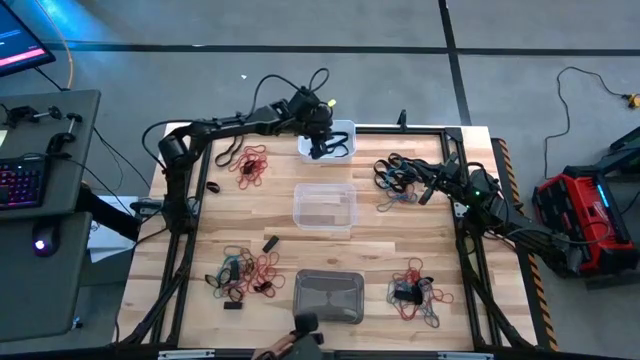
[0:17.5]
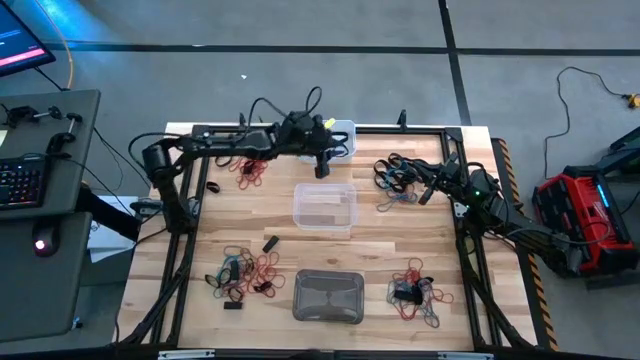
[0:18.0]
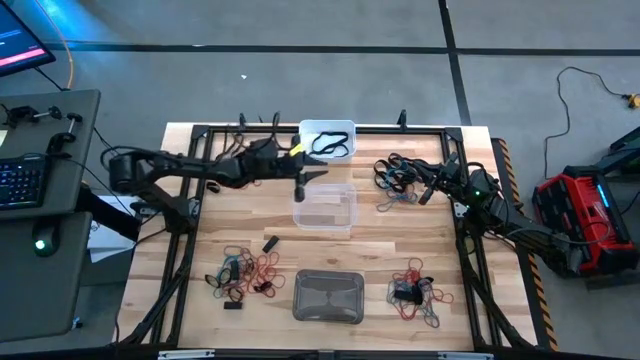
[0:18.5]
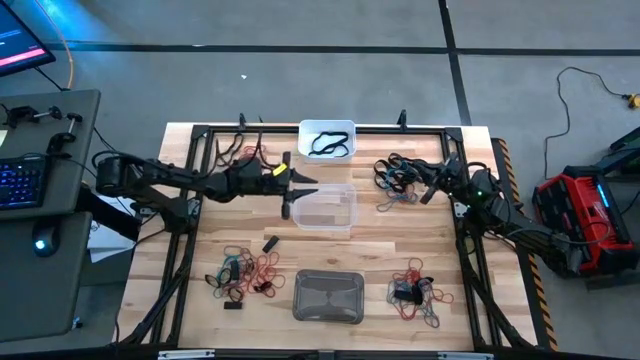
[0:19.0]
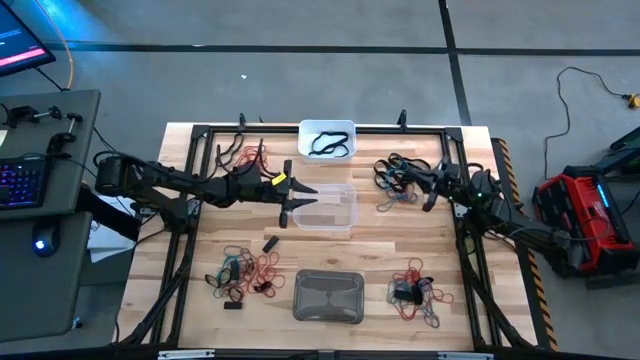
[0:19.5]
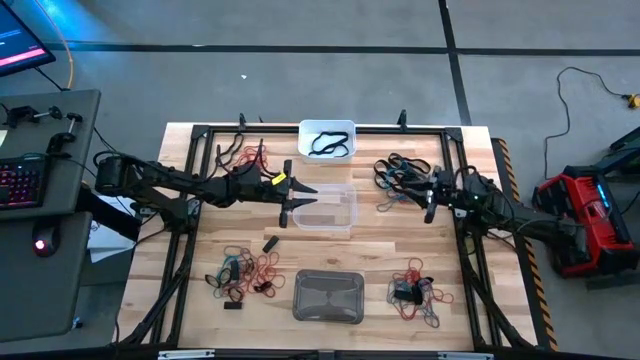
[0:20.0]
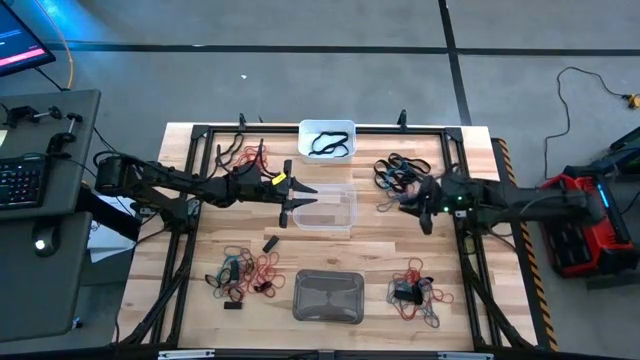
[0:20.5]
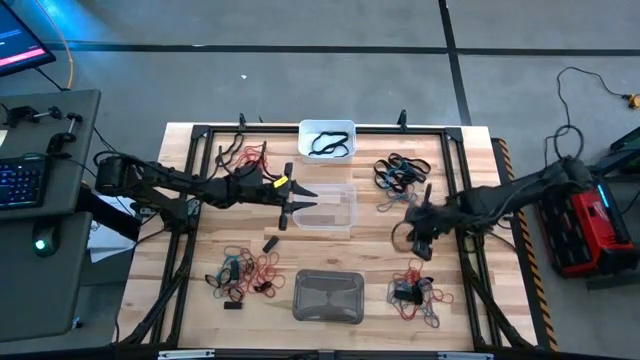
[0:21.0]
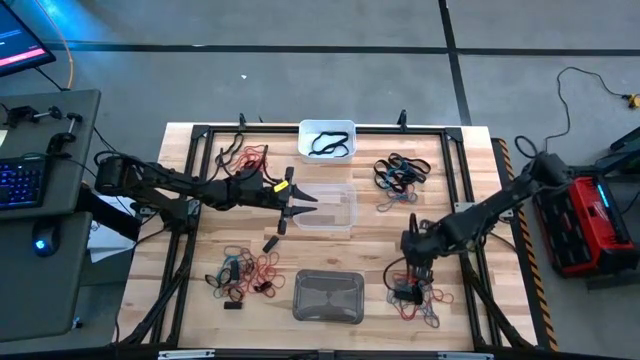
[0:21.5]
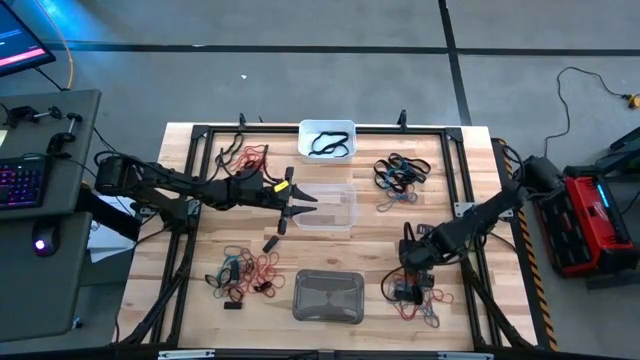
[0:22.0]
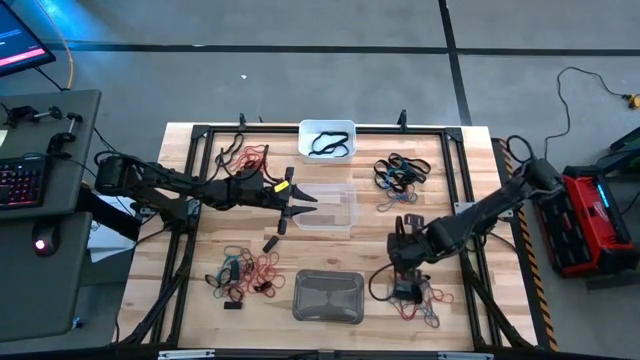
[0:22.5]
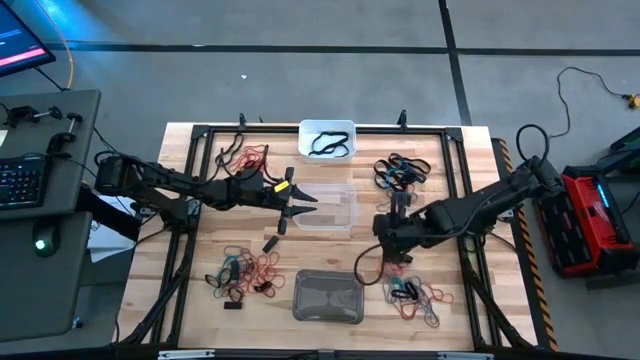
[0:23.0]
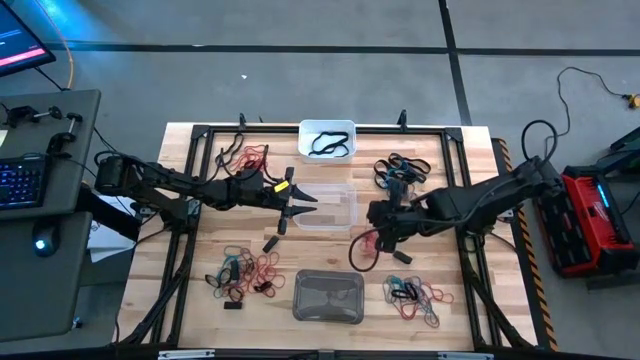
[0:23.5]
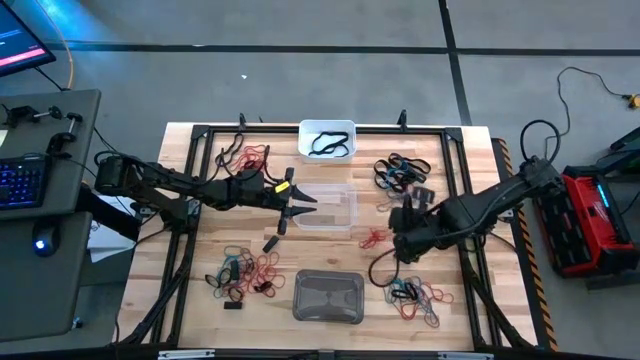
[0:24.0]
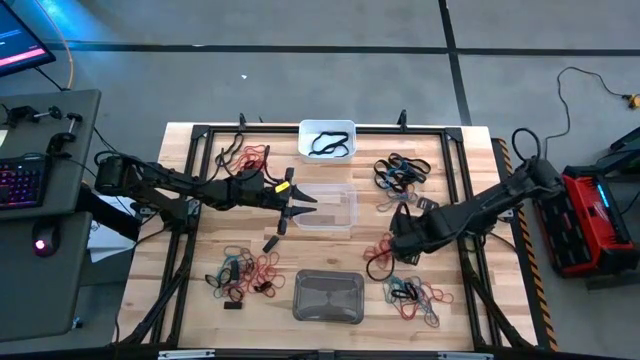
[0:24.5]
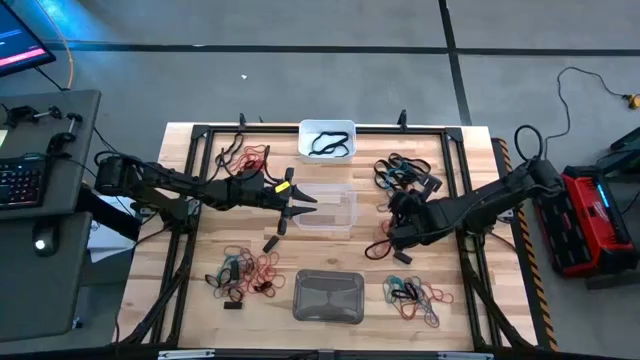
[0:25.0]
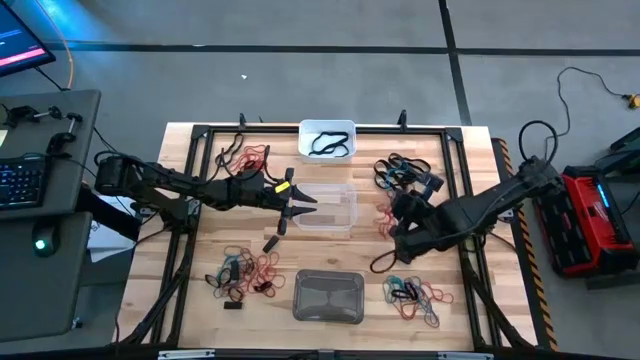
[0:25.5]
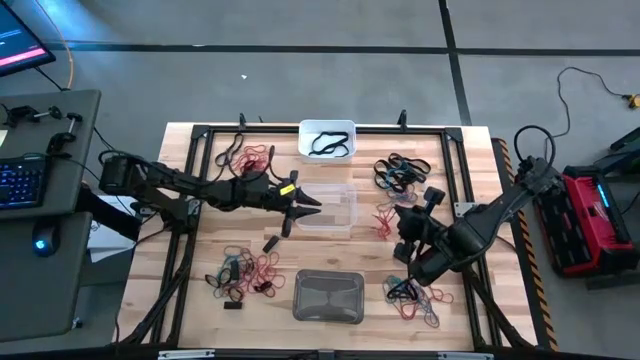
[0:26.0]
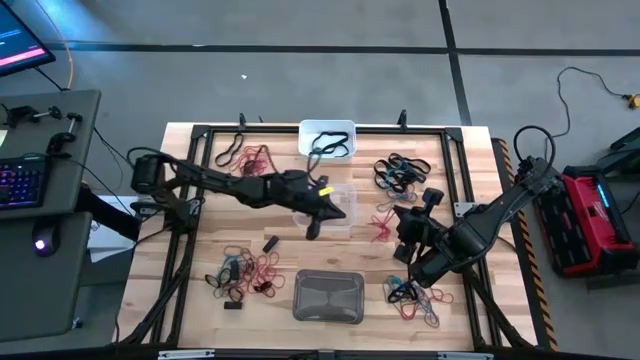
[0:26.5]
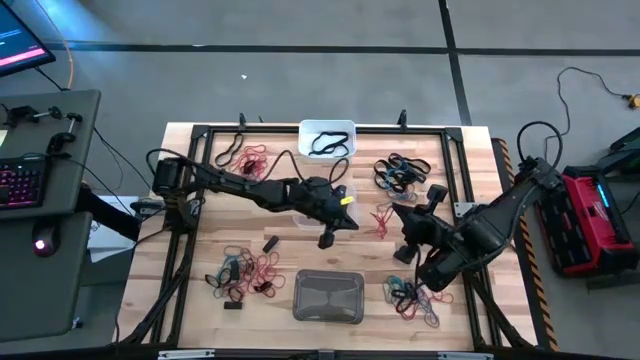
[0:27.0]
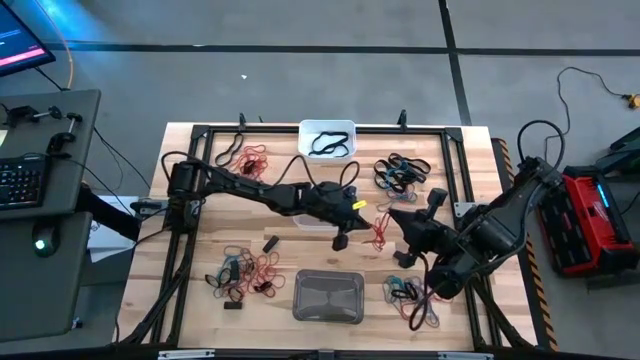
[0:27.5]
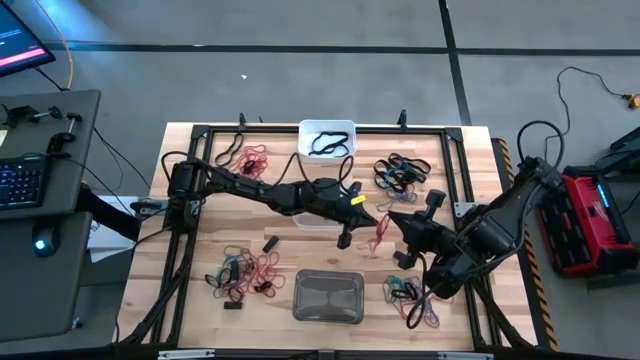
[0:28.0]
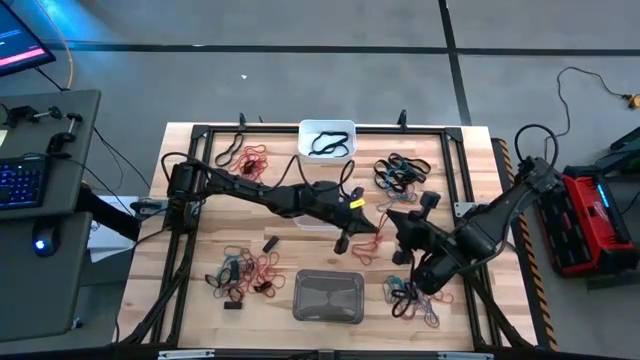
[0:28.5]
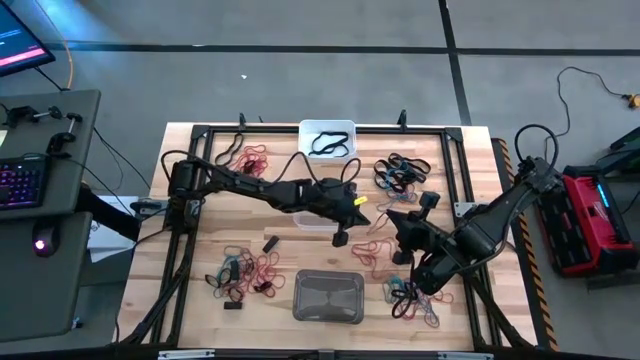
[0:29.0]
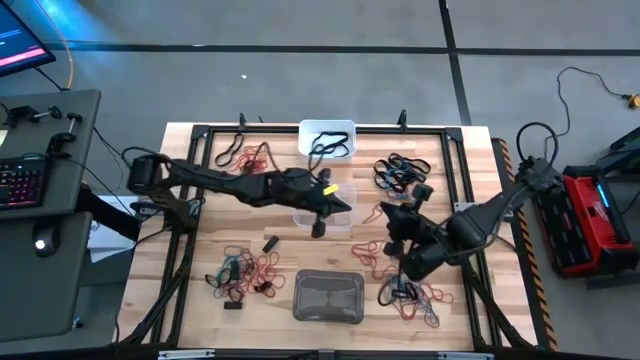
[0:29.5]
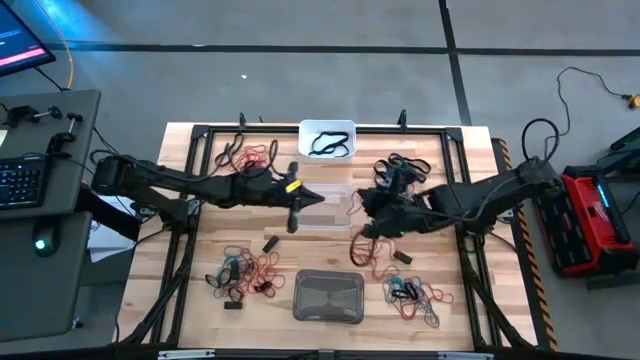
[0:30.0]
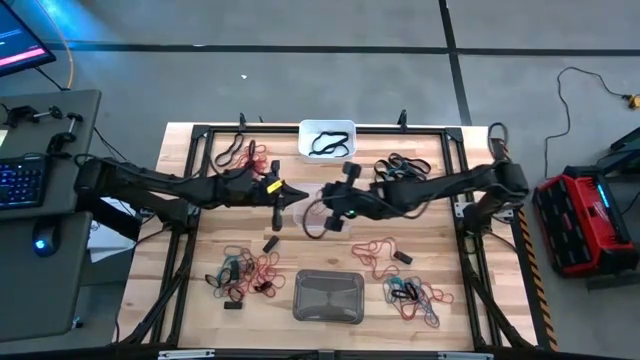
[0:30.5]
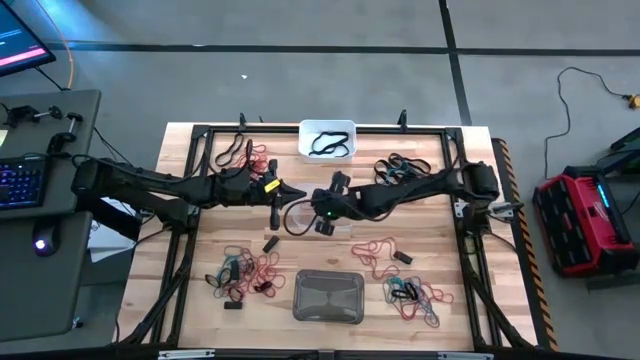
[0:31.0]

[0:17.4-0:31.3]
Task: Sort rubber bands into baskets
Put the red rubber band into the transparent bin

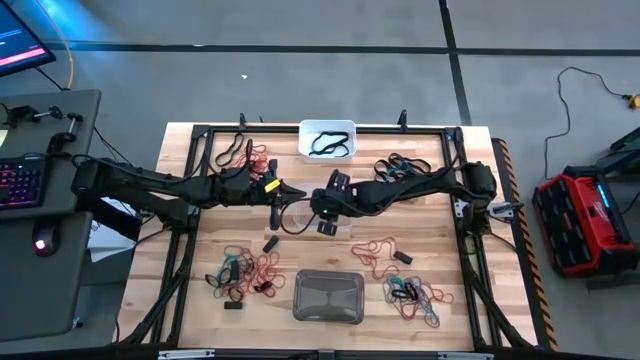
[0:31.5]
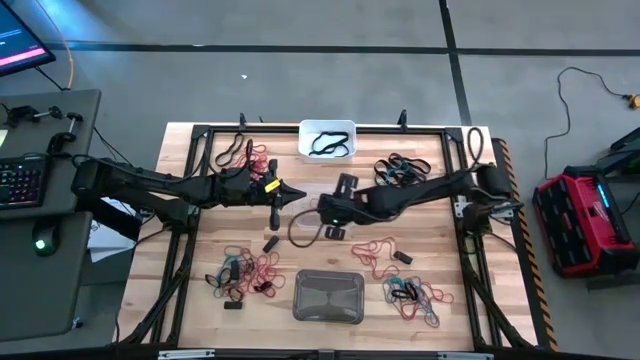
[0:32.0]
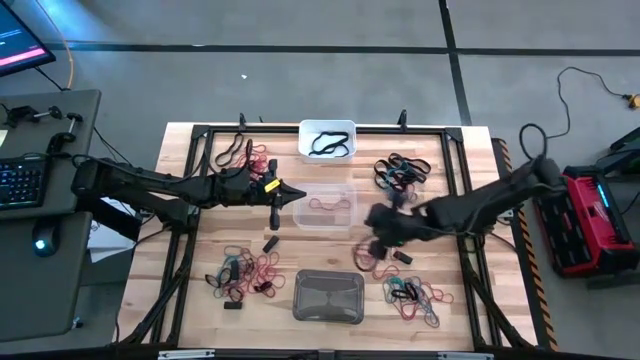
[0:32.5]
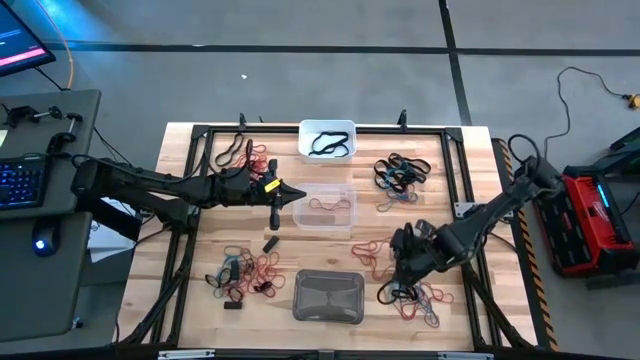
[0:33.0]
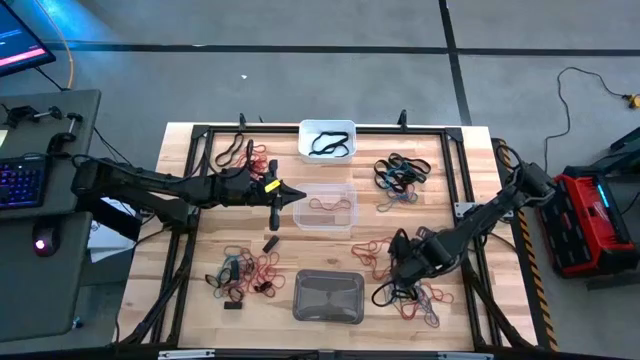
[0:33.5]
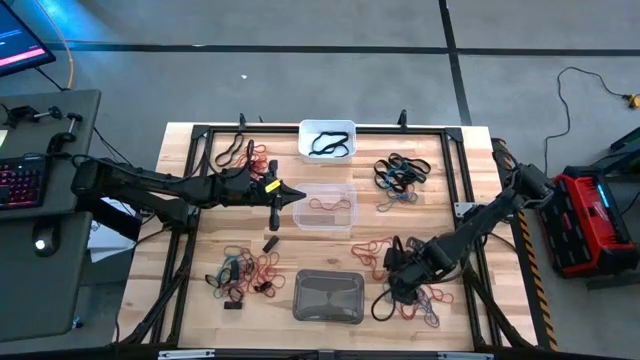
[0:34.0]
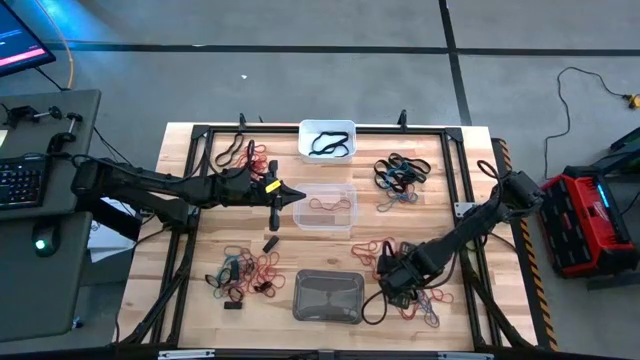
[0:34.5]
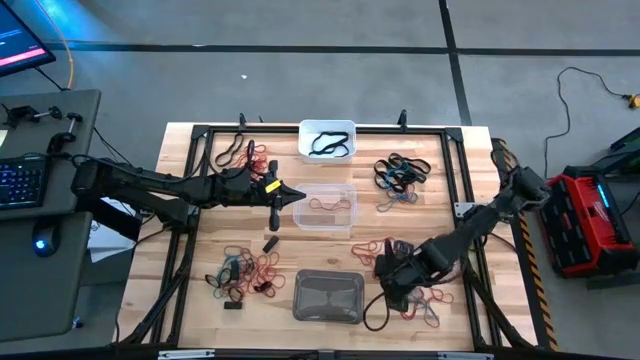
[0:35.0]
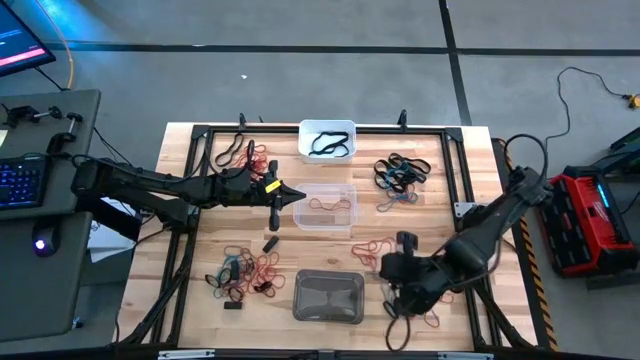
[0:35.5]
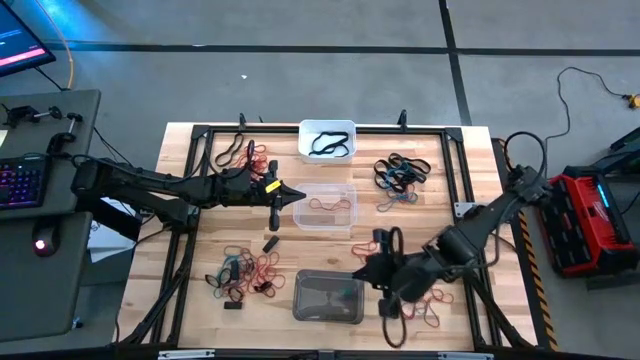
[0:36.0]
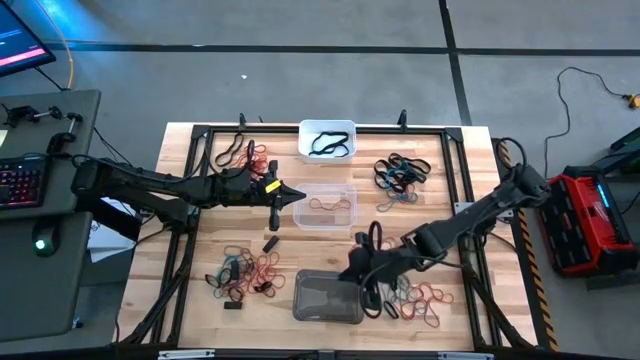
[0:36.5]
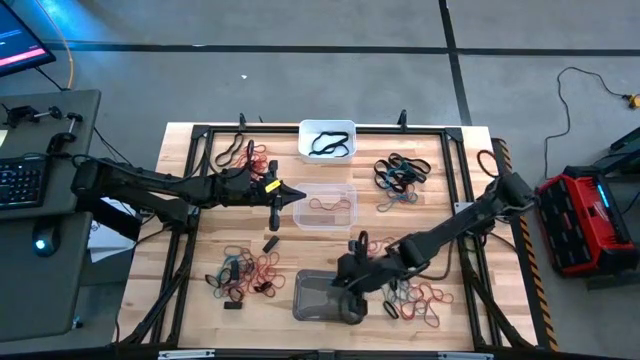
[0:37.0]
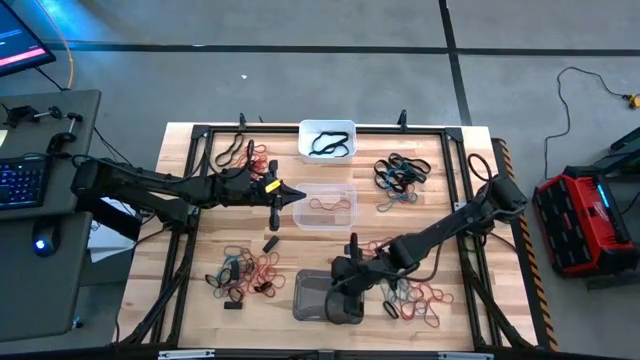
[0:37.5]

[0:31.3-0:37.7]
Put the blue rubber band into the black bin
